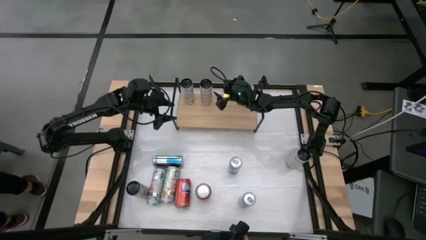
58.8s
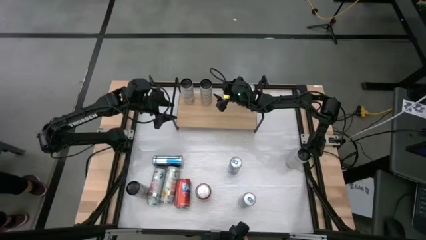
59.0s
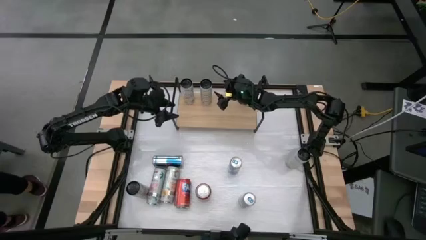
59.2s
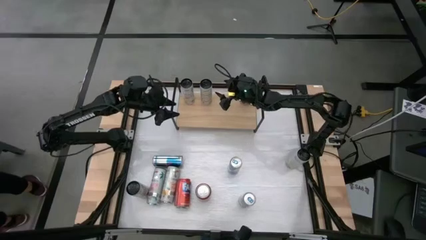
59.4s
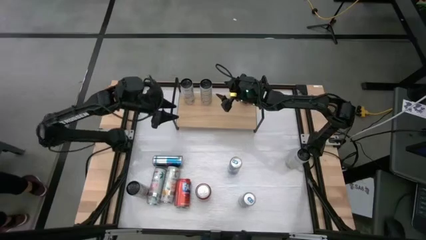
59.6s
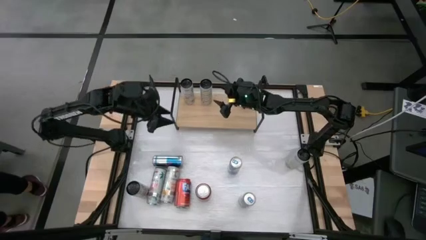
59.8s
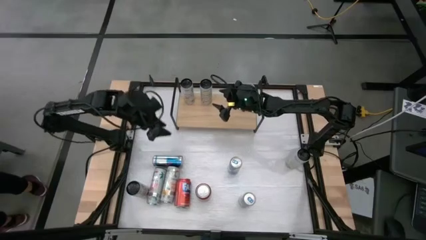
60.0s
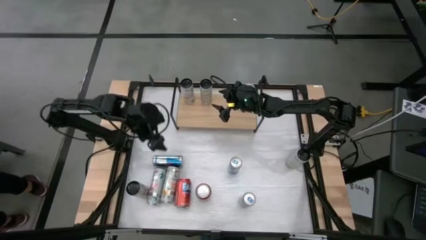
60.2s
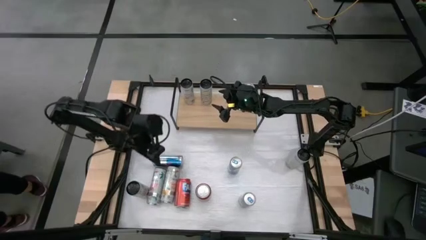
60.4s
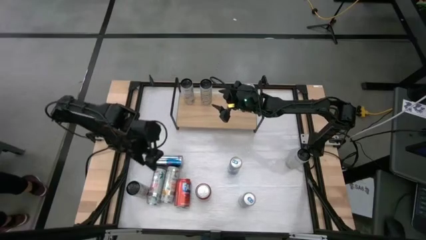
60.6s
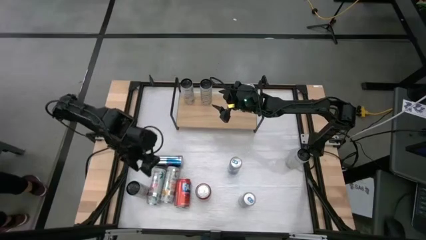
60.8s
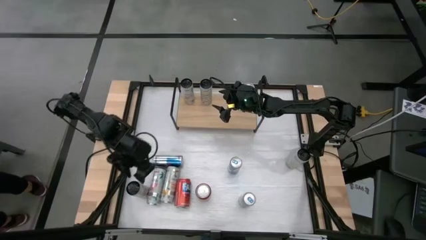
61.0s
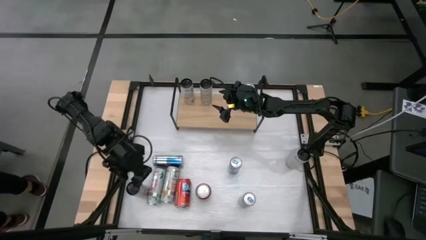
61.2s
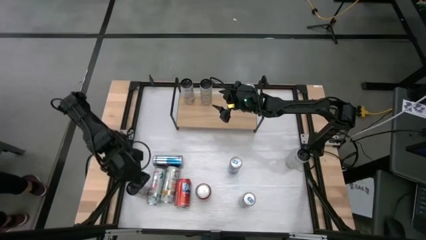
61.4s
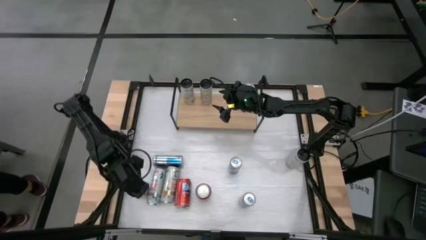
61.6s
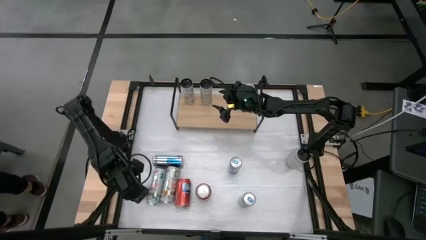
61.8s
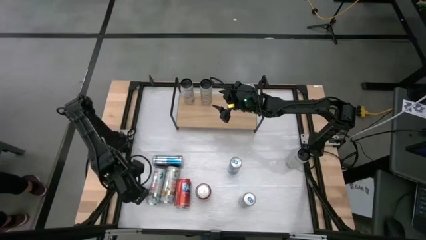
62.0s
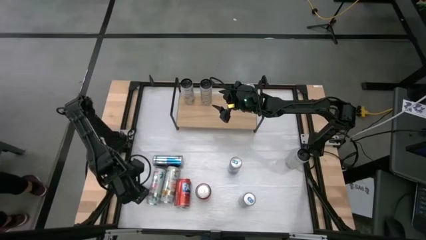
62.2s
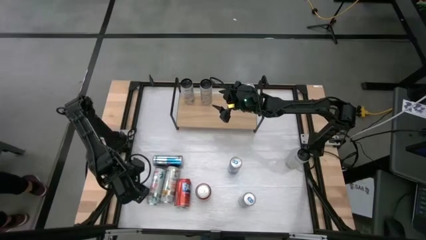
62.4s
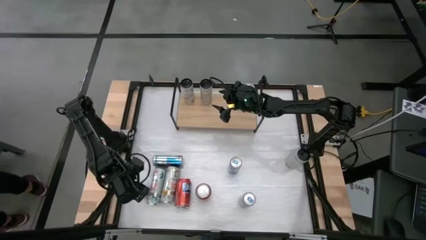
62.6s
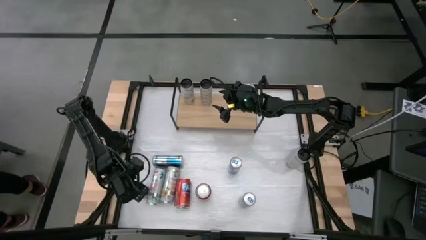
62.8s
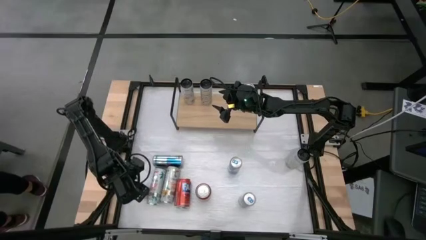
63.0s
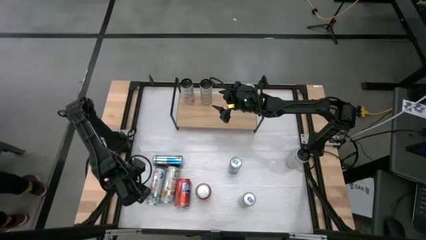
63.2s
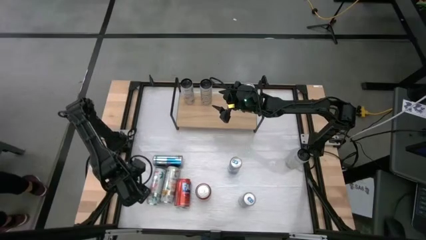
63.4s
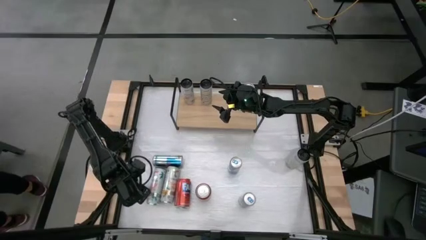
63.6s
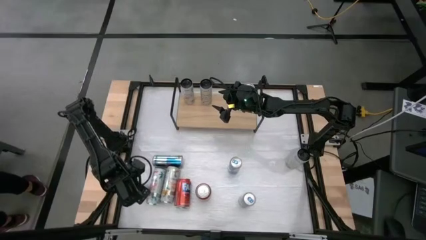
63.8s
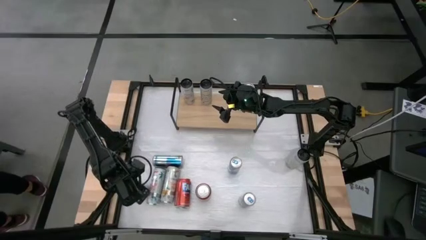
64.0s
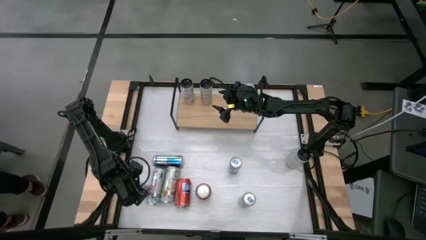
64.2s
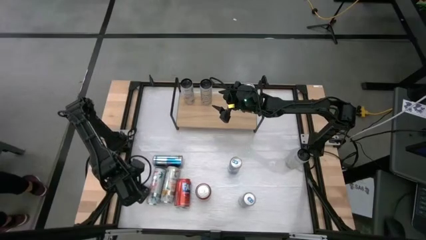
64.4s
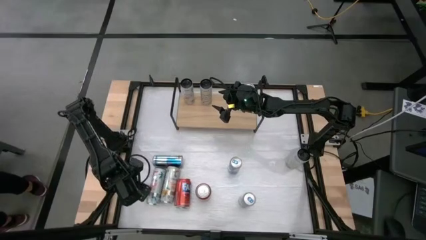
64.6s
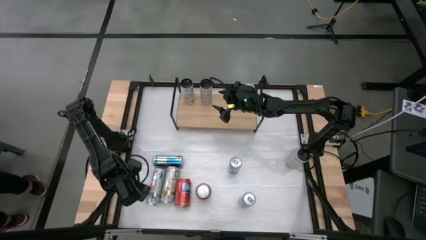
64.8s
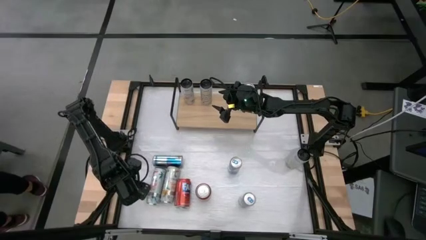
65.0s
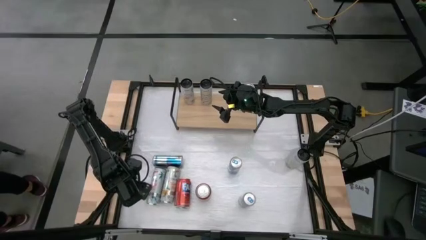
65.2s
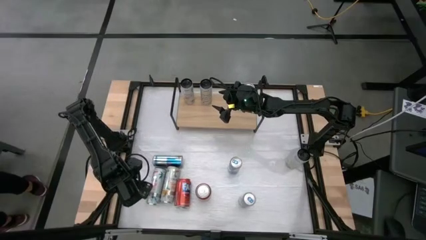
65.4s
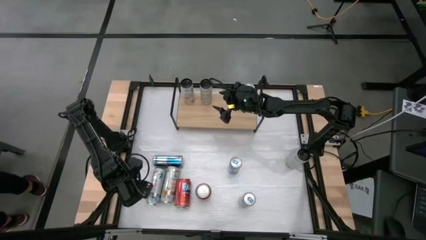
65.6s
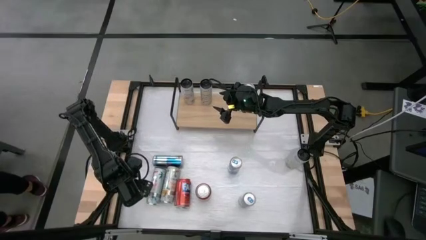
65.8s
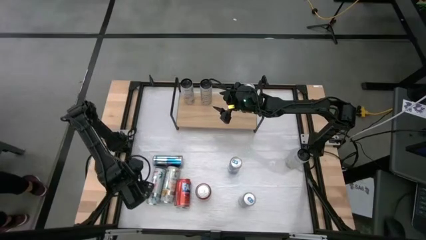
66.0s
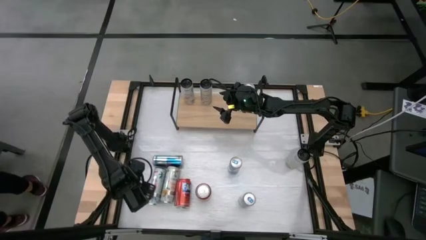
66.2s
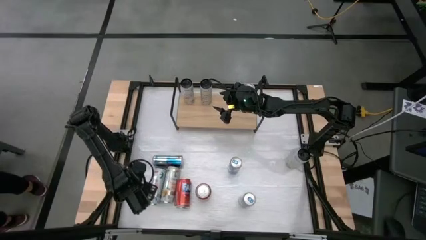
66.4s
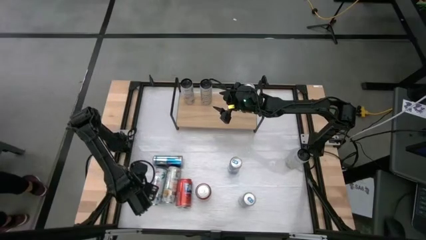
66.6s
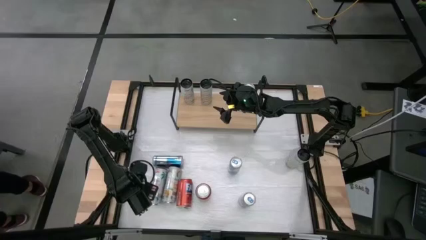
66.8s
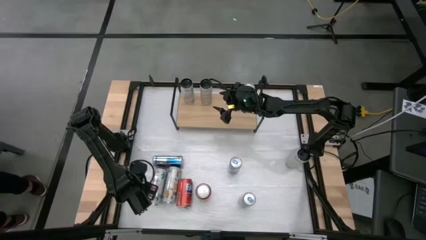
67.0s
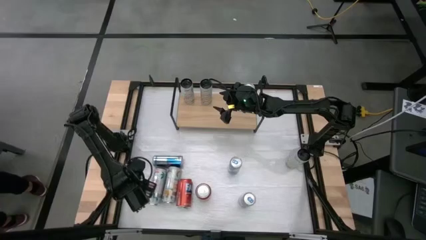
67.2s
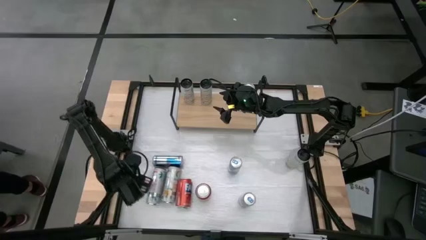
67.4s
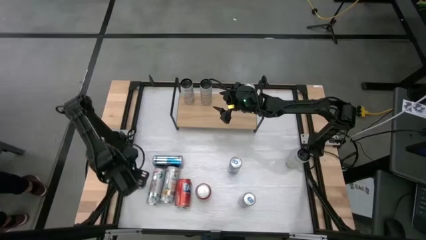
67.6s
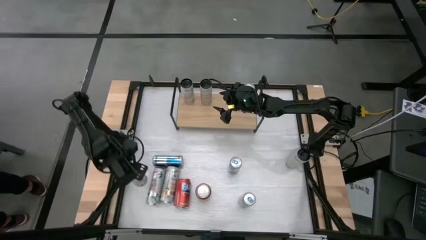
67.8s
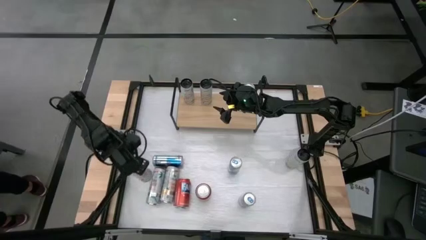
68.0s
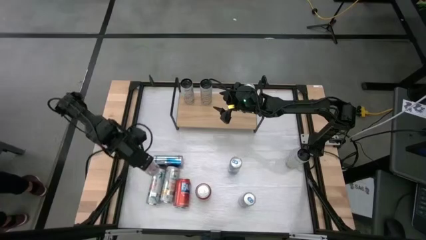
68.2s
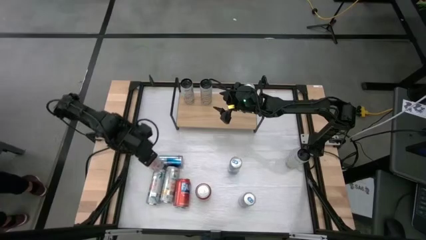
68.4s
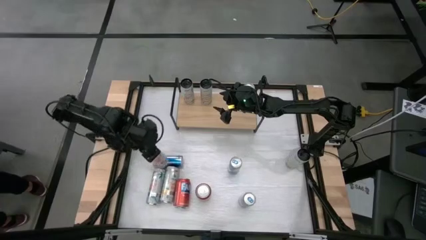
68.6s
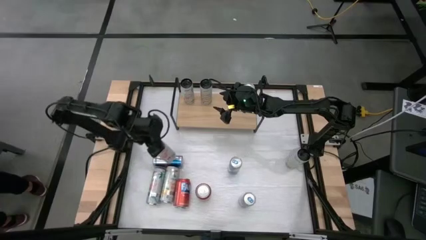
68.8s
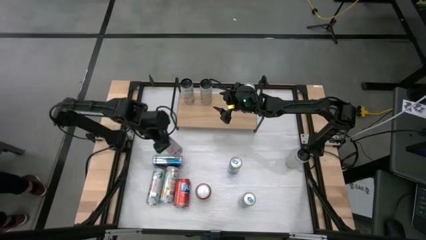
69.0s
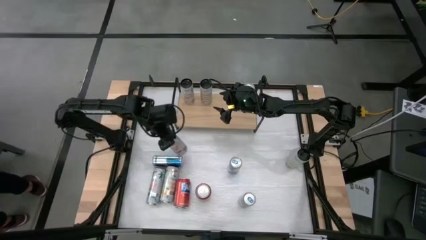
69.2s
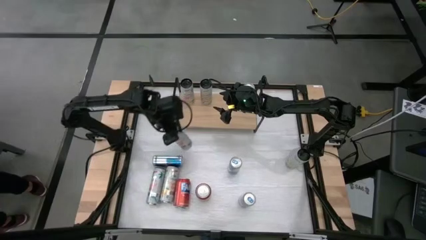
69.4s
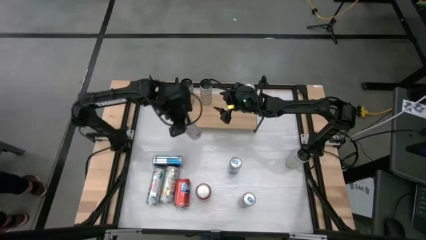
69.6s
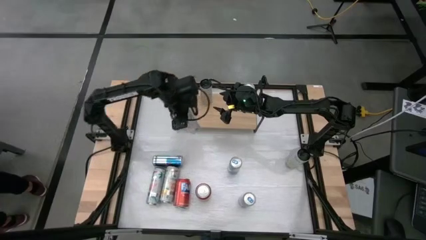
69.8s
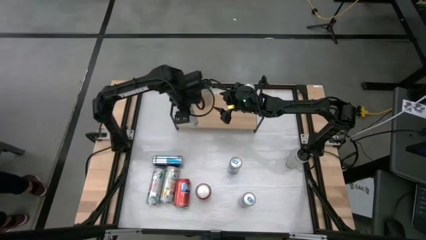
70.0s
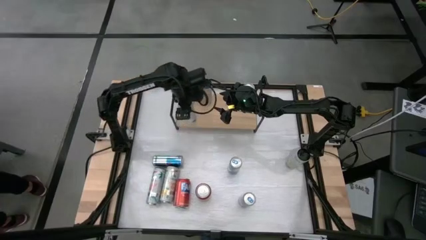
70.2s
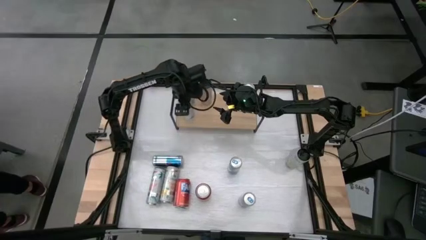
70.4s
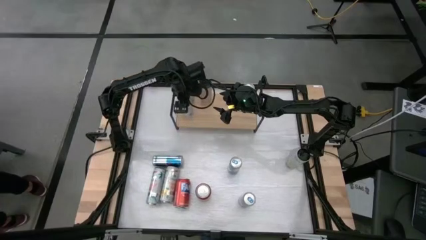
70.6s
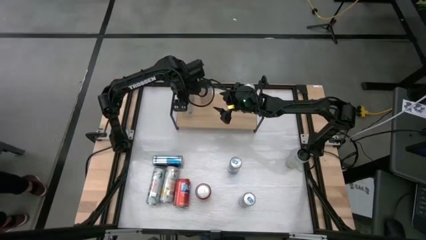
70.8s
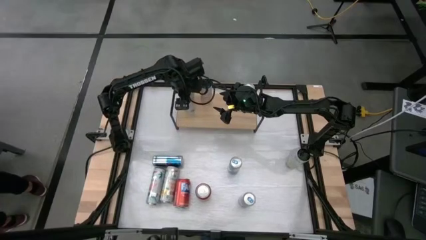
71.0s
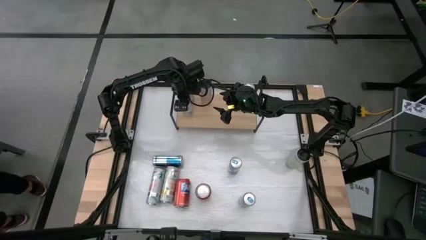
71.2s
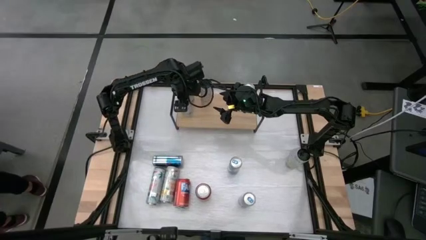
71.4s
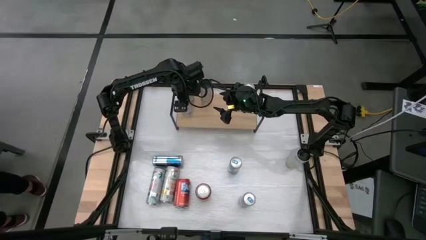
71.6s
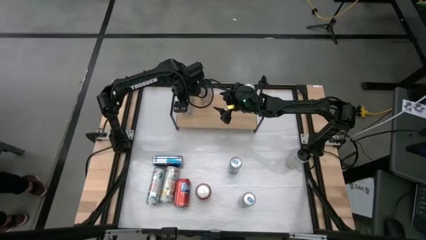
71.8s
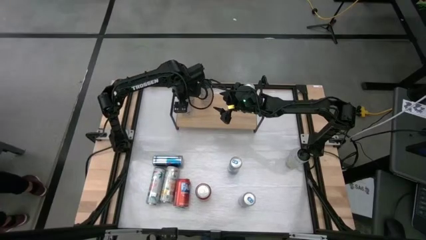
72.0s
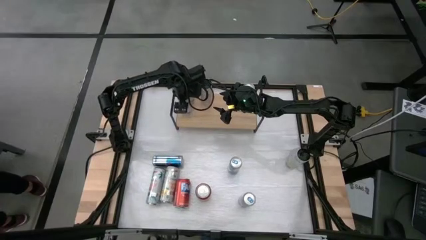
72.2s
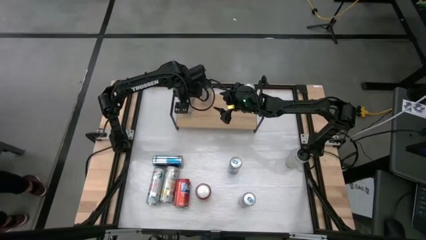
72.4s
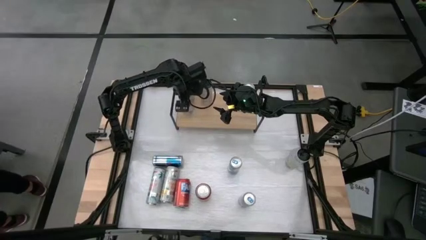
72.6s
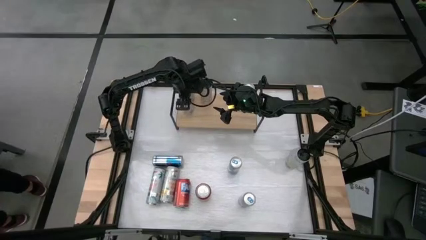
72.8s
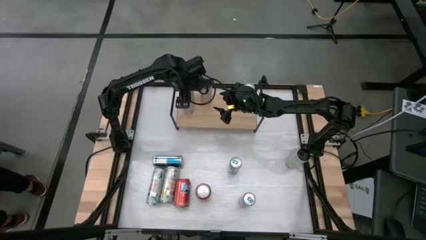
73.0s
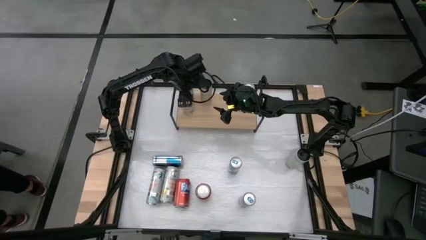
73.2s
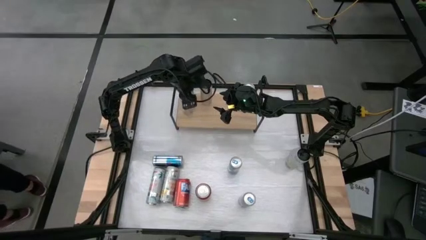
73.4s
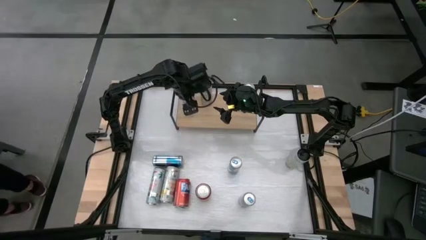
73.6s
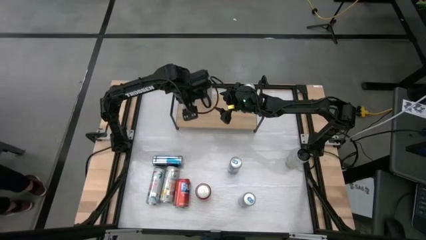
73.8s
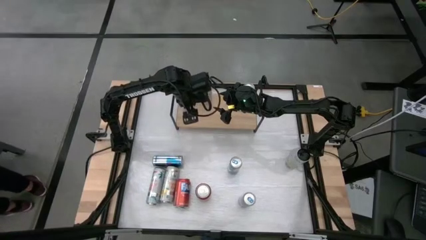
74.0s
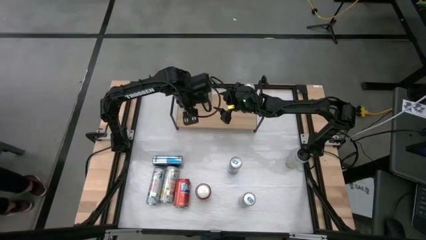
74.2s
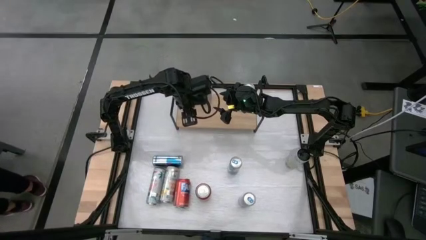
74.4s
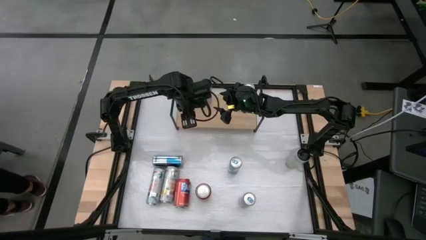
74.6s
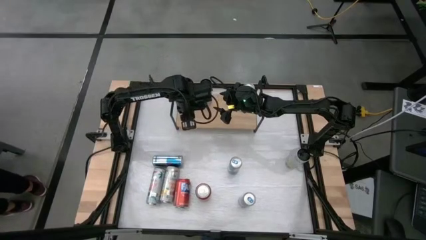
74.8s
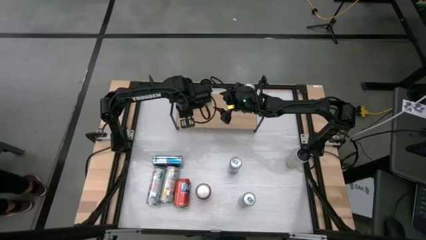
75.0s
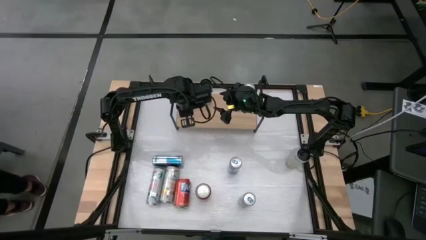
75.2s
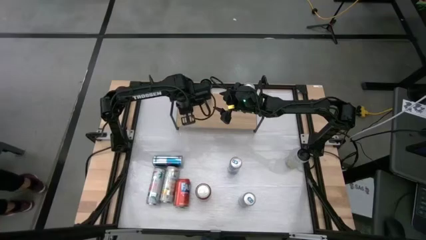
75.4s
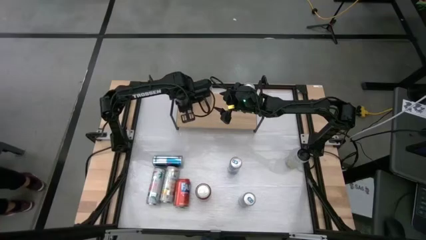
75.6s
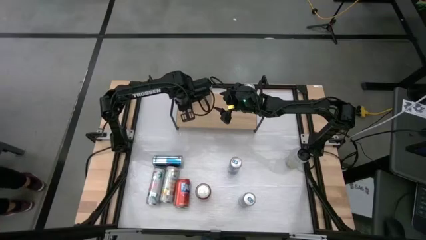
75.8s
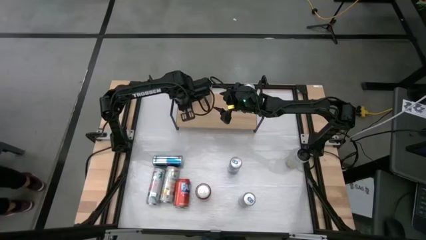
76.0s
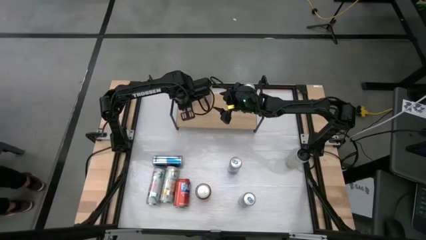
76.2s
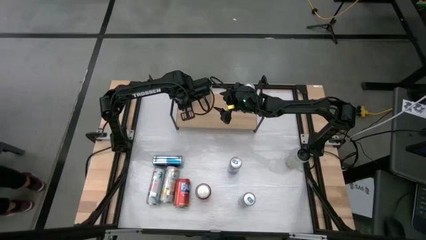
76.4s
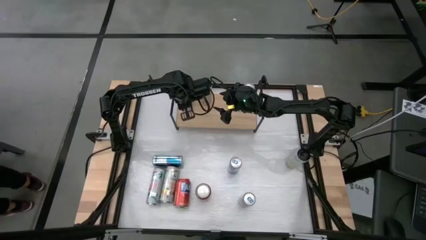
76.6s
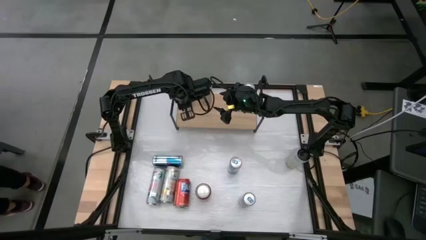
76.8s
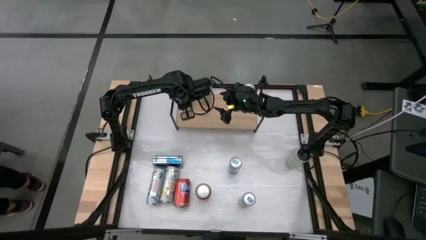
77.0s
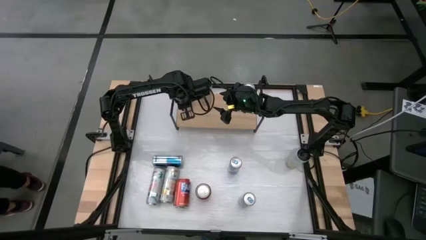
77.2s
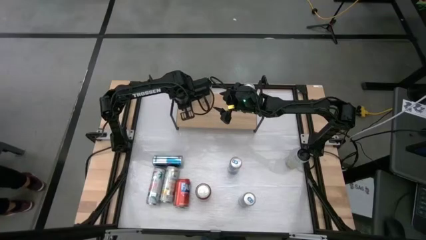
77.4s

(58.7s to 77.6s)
Task: Place canned beverage on shelf
Put the left white pink soda can on the shelf aligned with the other white pink soda can
